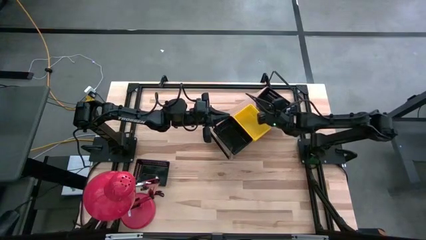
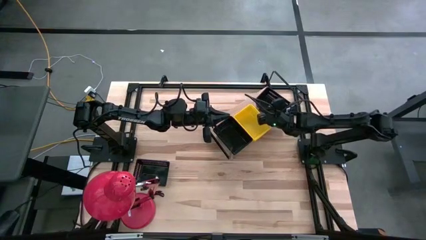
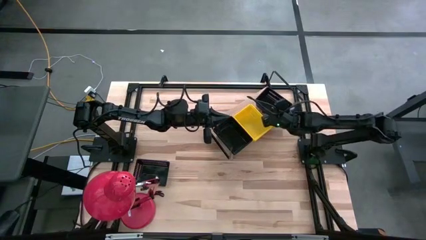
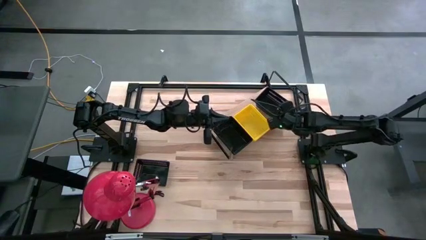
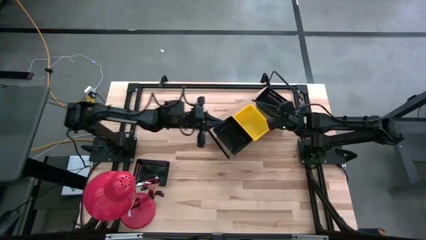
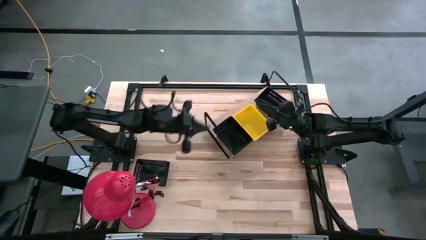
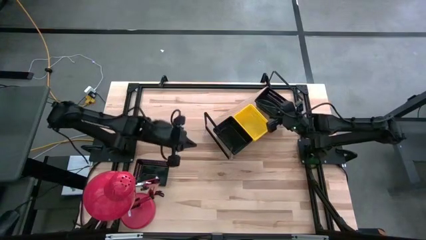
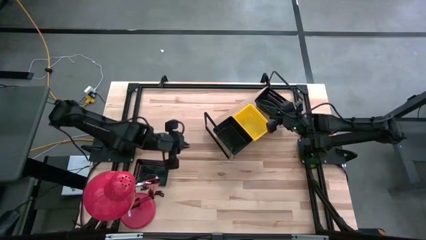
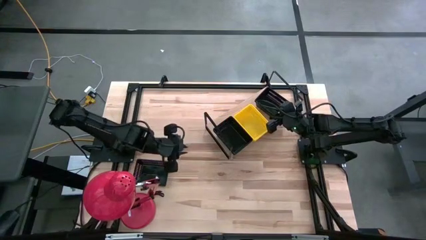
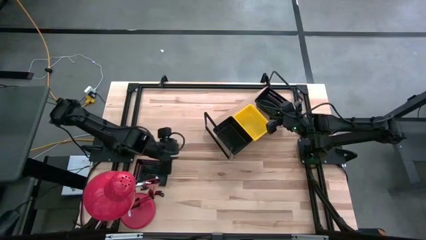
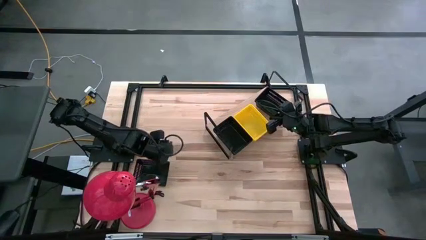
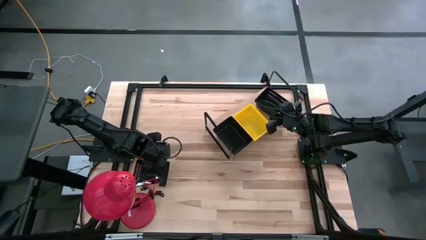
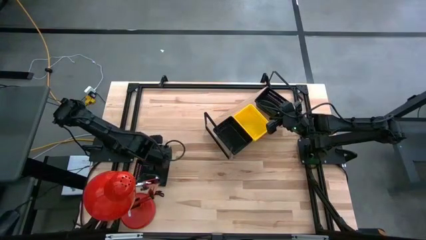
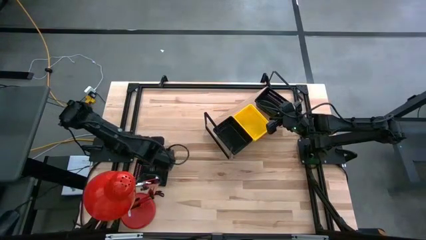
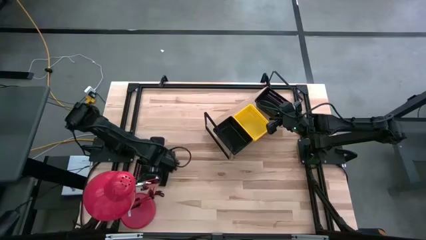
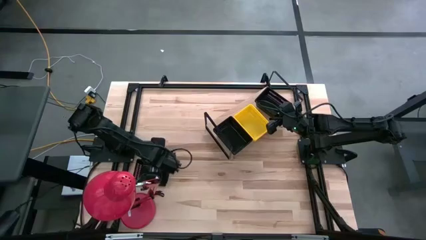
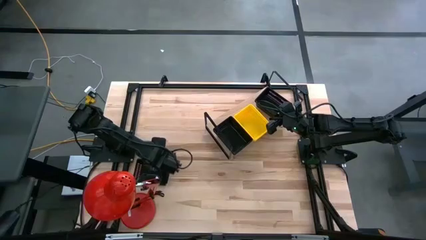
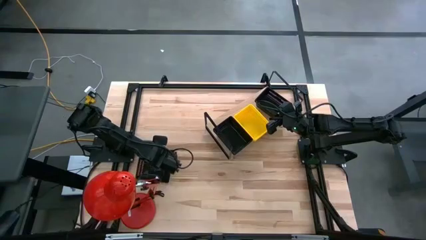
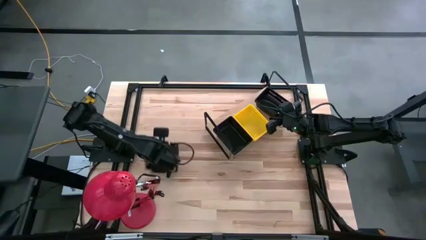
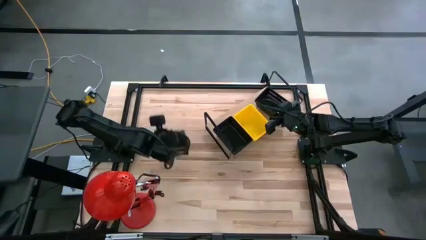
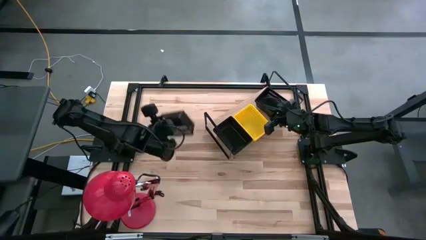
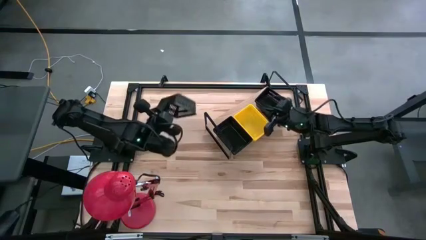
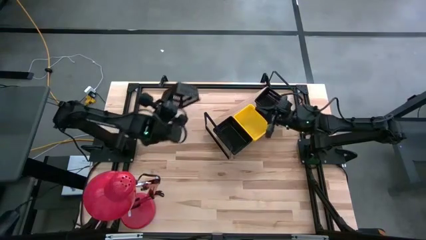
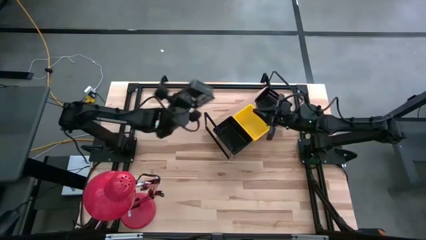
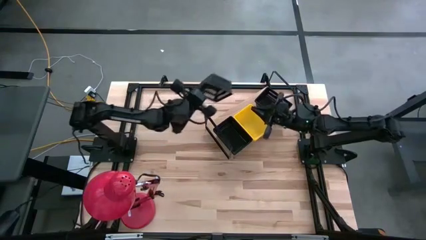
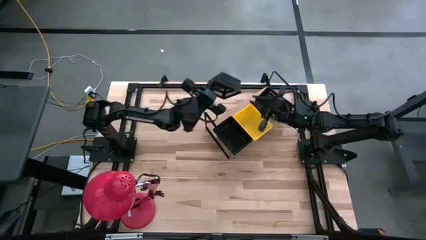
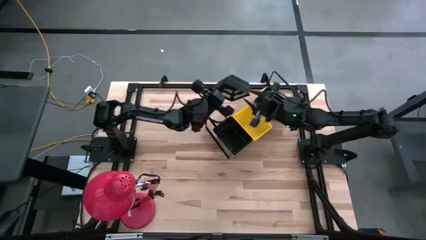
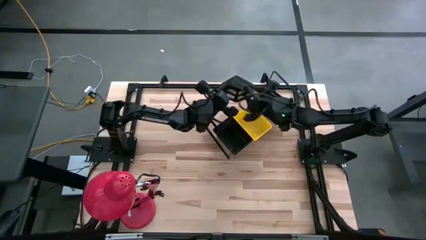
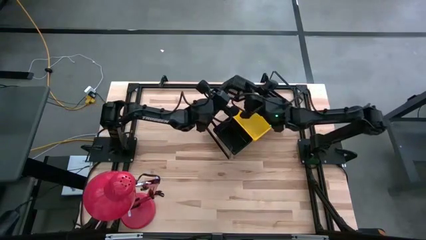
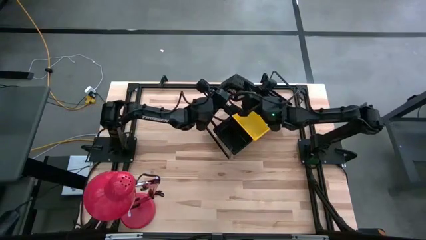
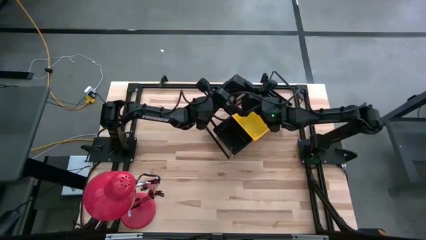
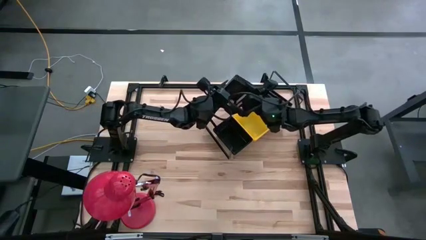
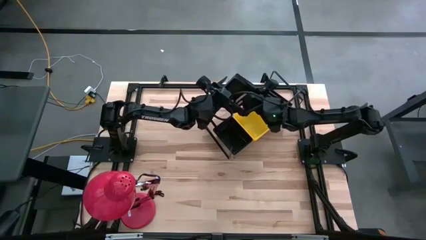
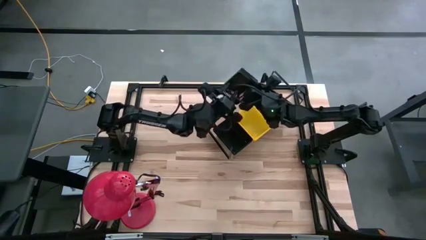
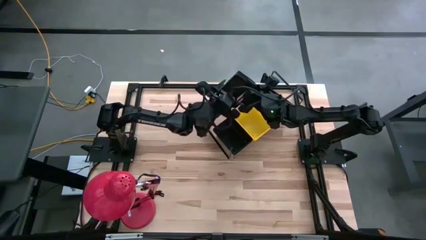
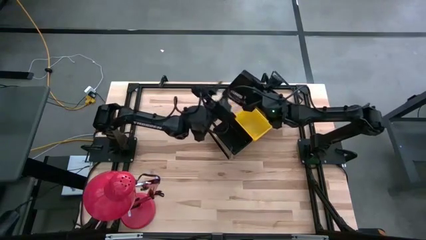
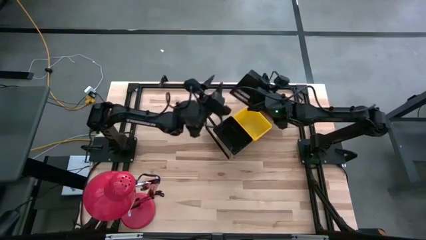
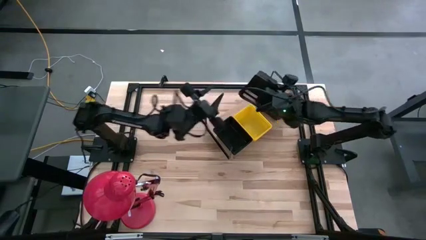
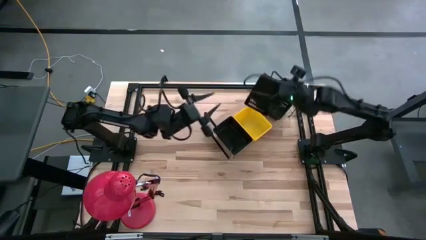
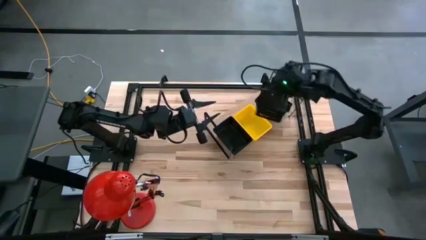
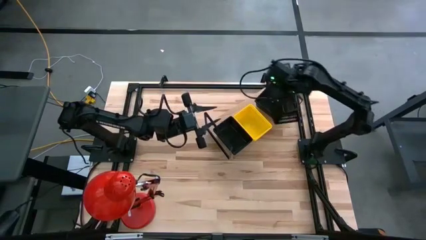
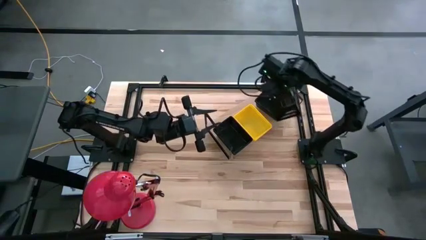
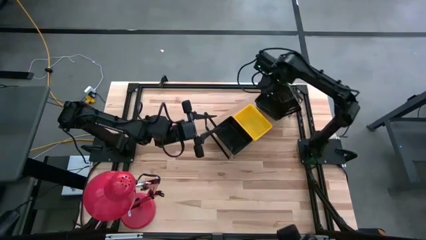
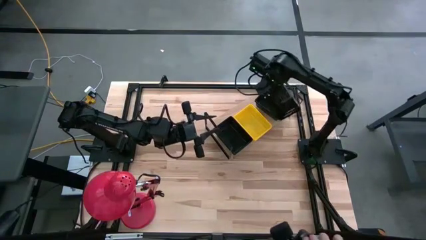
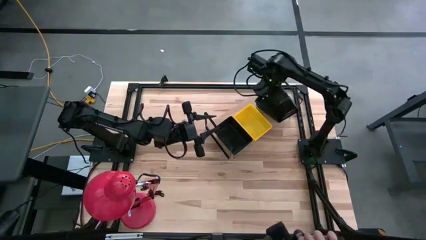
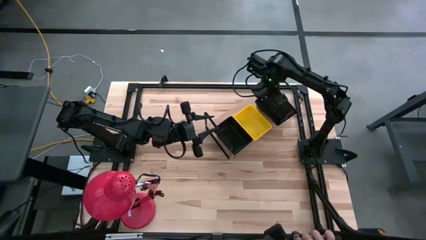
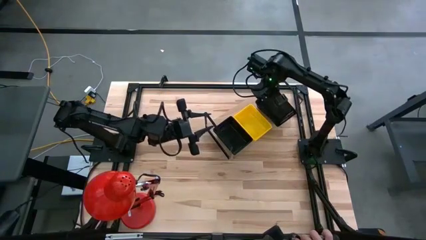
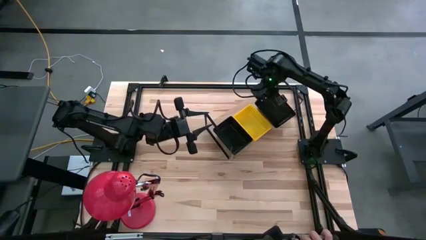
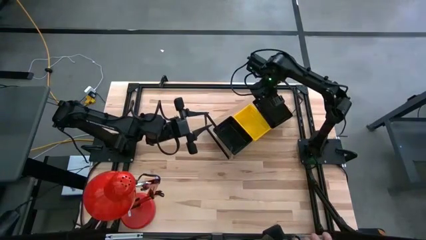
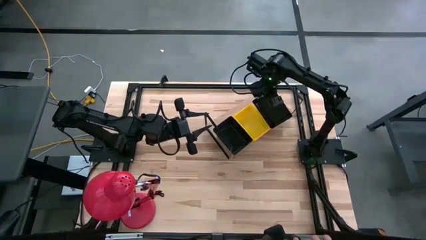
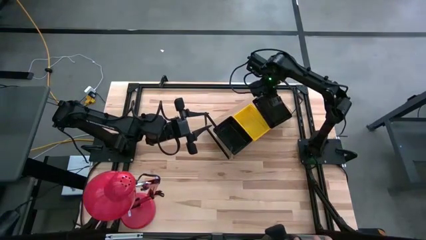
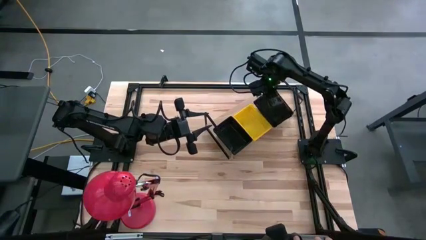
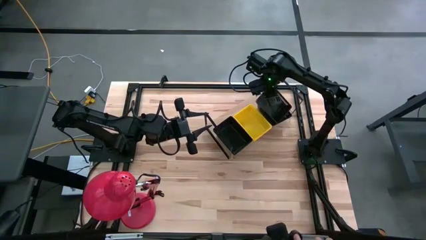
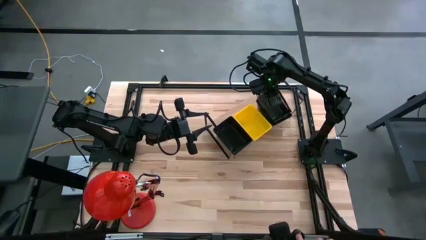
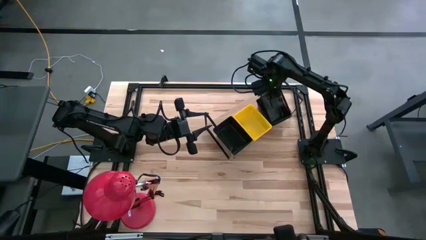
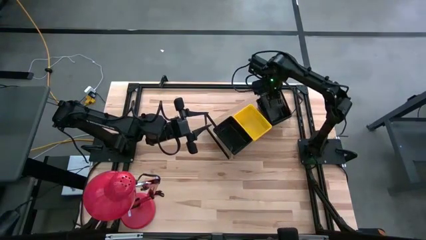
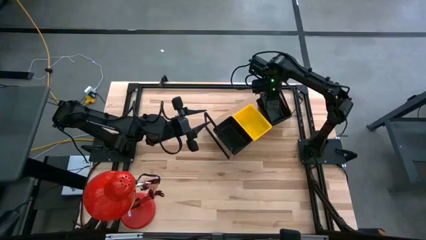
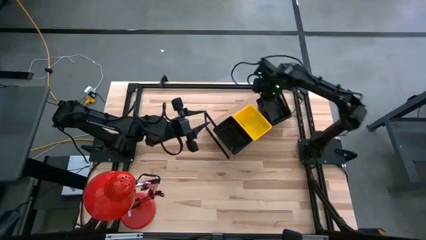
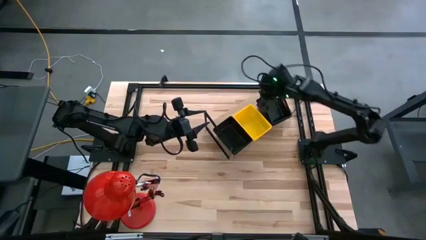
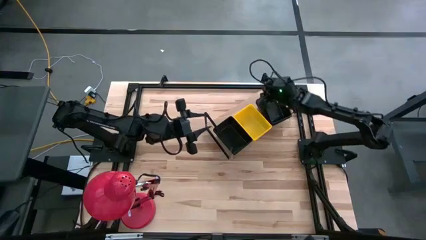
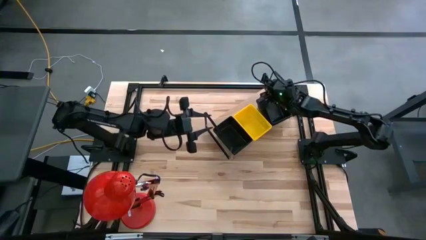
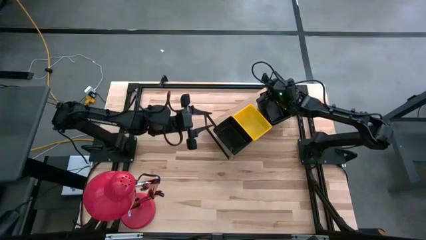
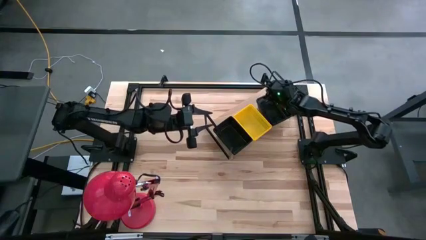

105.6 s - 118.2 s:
Task: Stack baskets on shelf by color
Stack the black bin on top of the black bin on the shelf

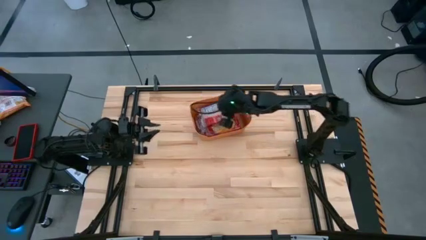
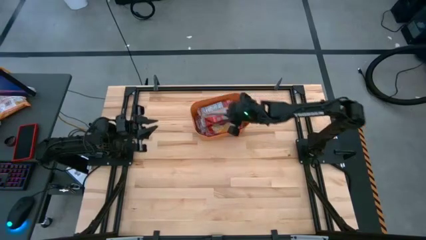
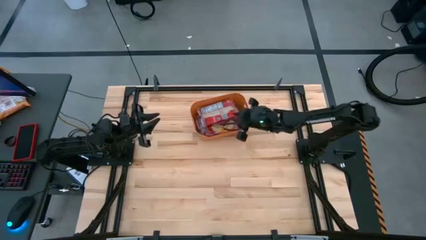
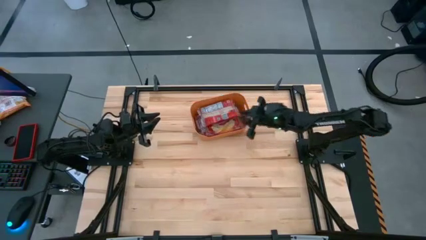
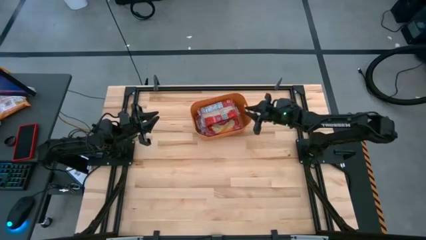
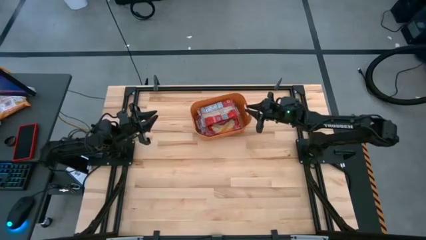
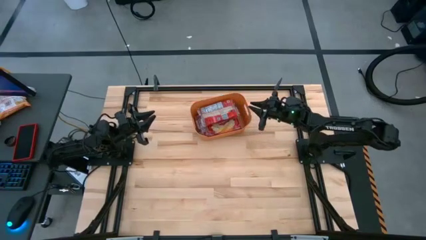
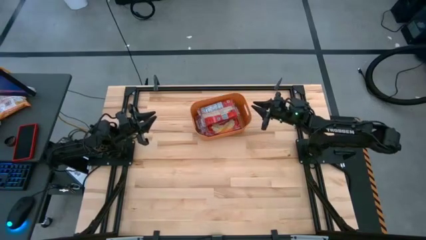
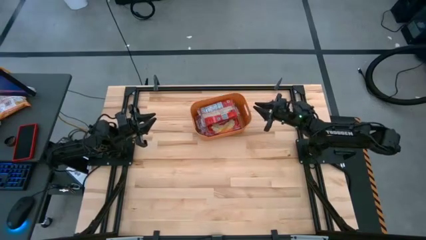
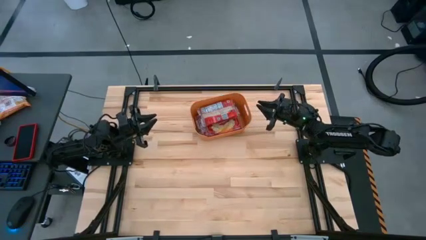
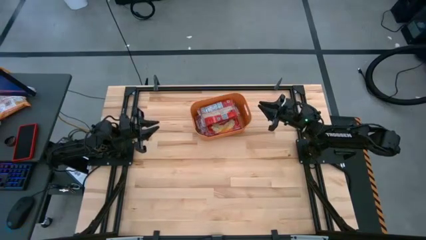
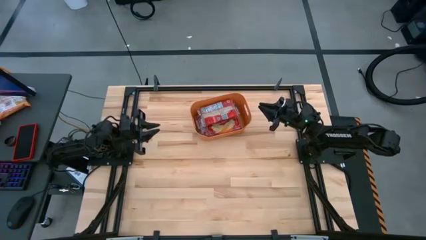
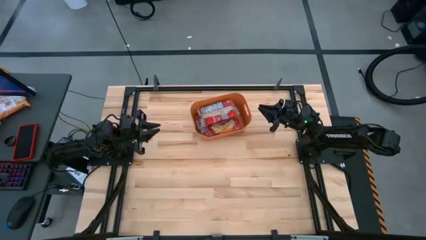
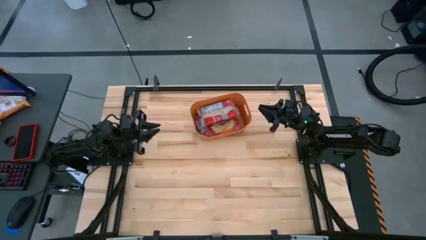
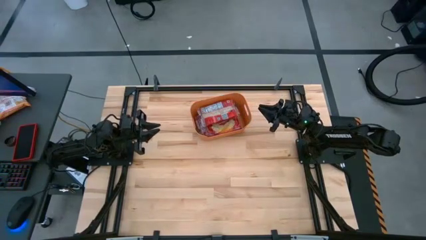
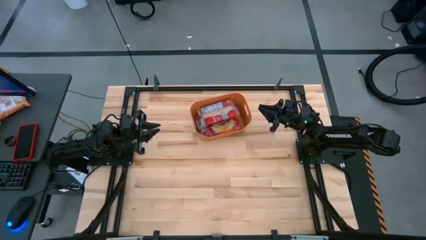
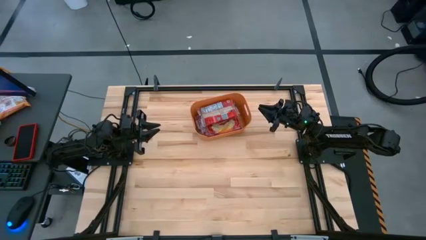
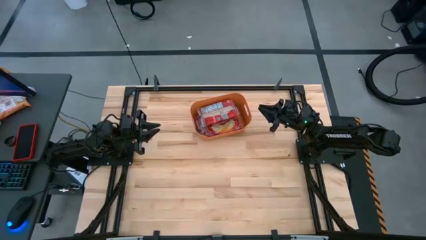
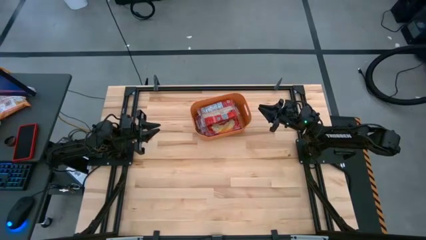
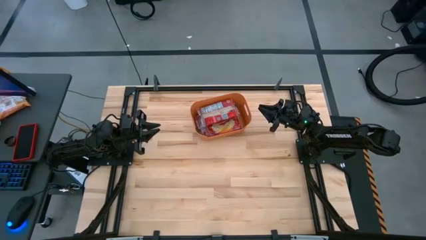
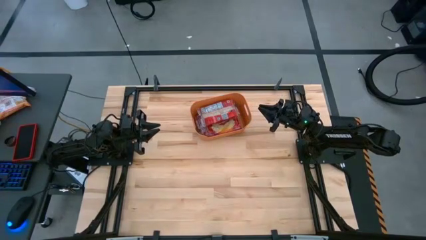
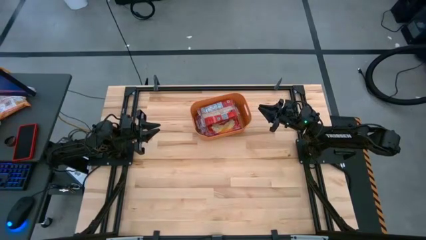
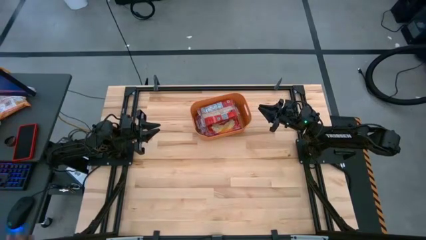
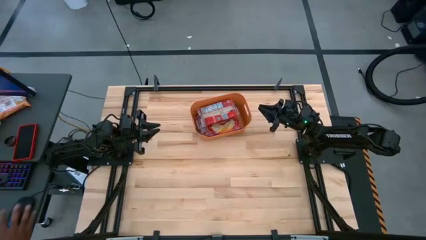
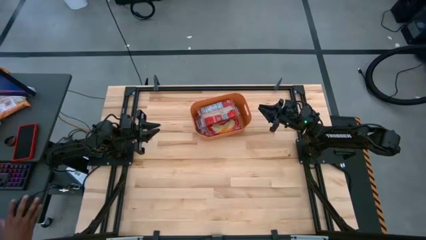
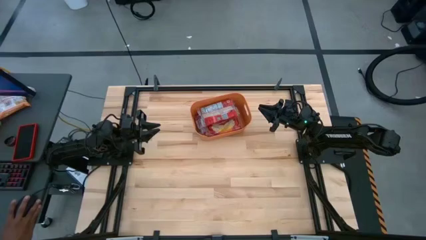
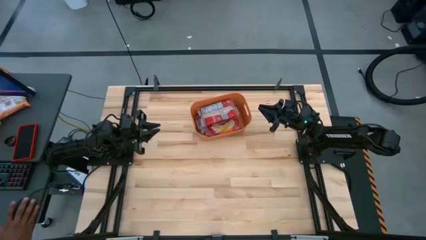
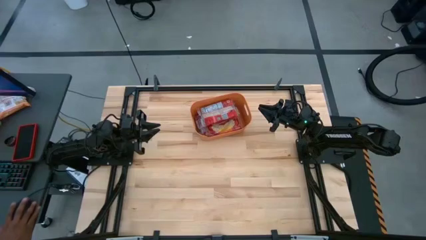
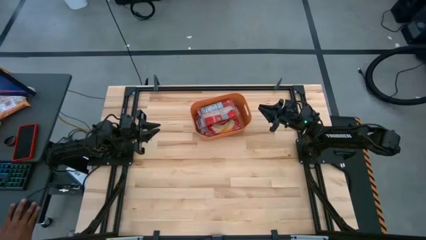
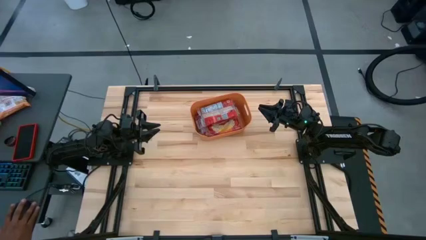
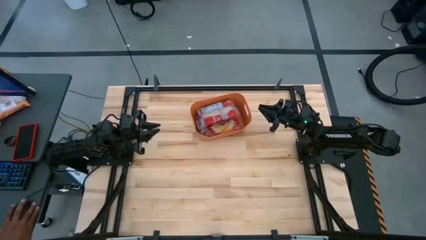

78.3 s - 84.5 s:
Task: Sort popcorn bags into baskets
Return to Home Position
